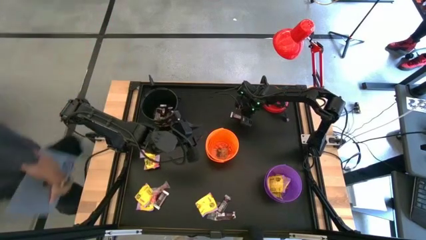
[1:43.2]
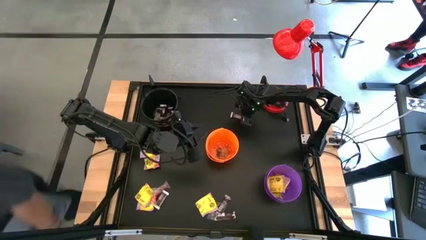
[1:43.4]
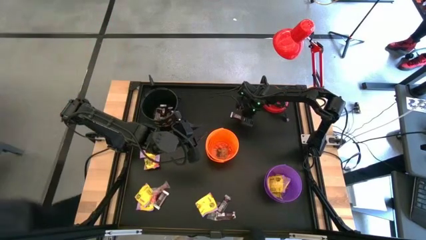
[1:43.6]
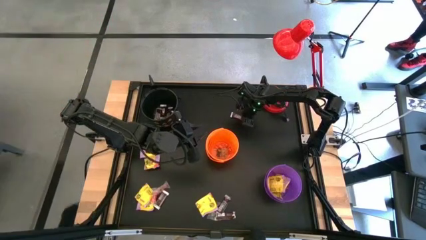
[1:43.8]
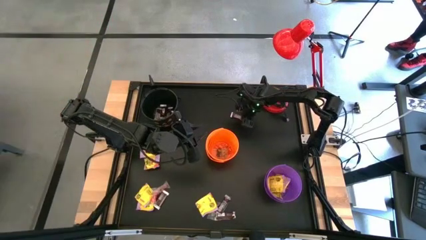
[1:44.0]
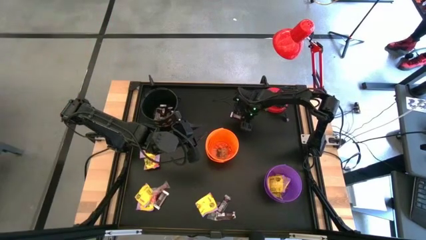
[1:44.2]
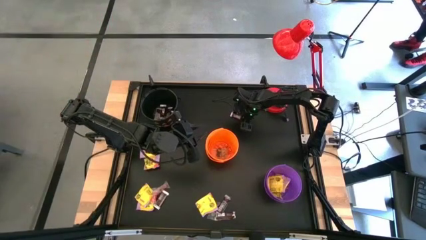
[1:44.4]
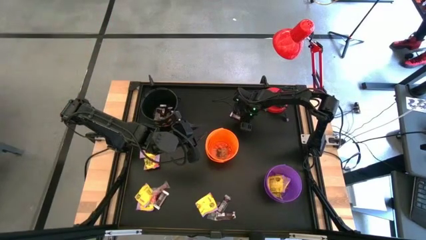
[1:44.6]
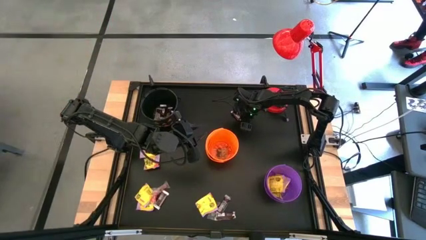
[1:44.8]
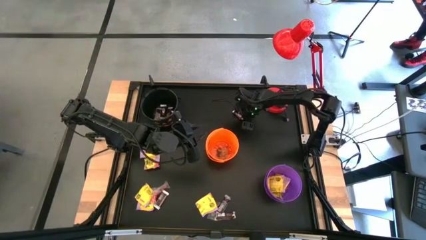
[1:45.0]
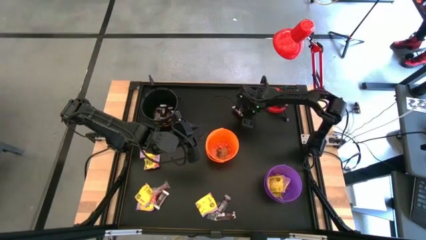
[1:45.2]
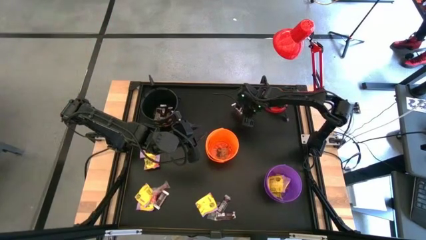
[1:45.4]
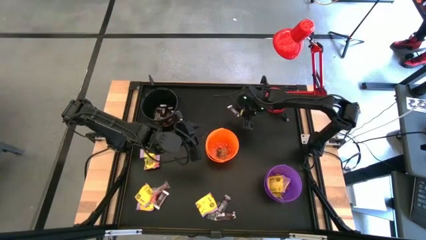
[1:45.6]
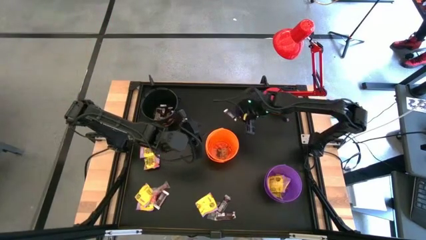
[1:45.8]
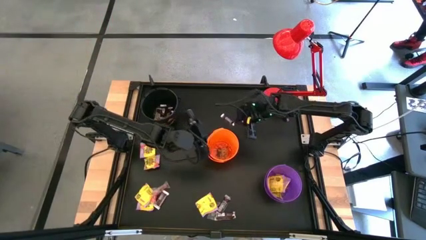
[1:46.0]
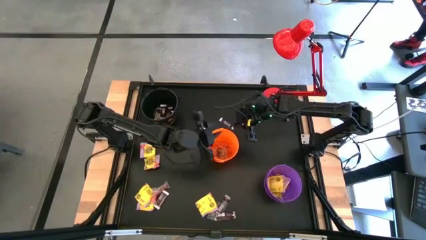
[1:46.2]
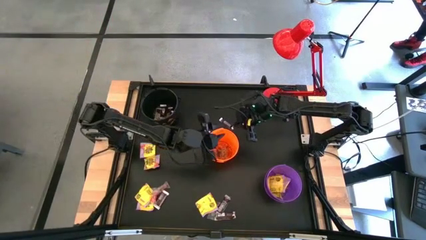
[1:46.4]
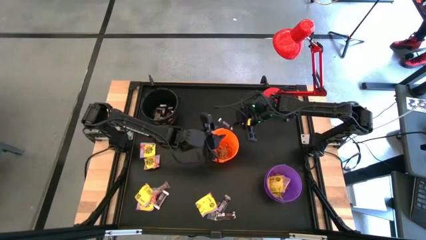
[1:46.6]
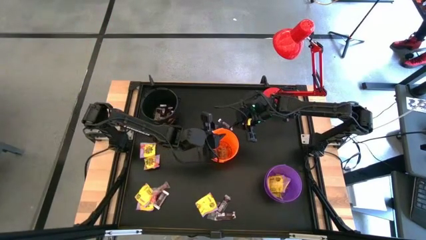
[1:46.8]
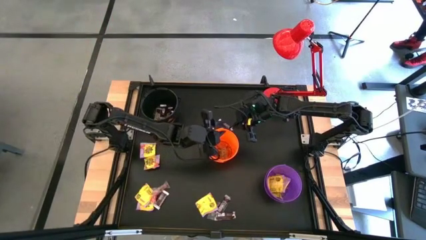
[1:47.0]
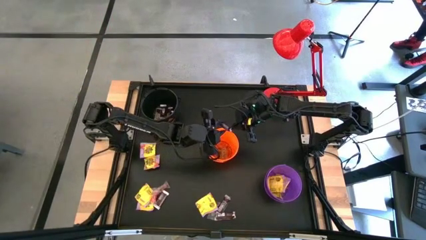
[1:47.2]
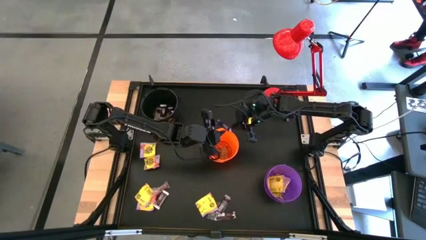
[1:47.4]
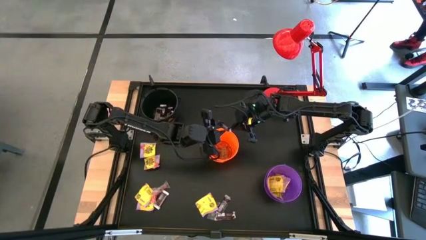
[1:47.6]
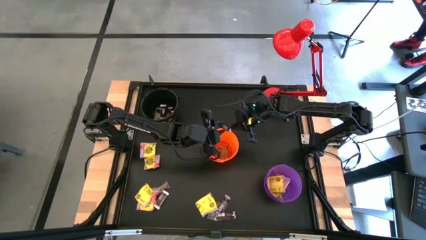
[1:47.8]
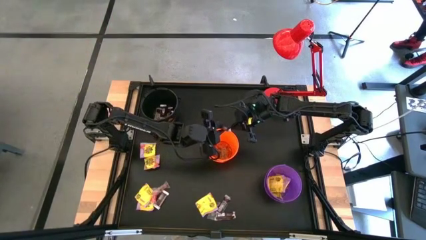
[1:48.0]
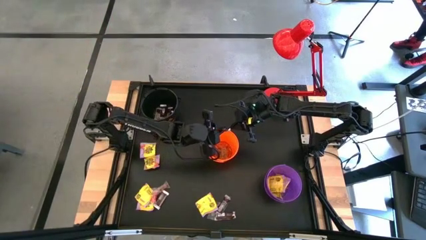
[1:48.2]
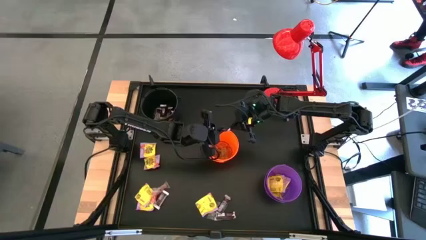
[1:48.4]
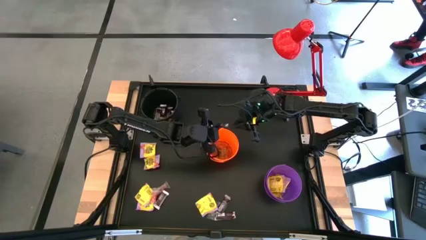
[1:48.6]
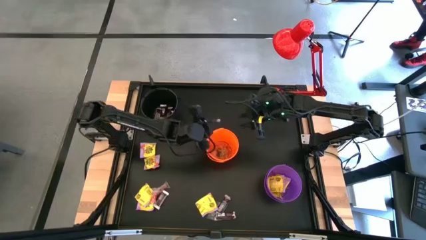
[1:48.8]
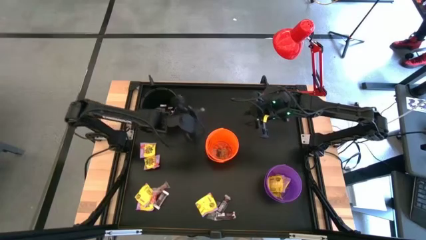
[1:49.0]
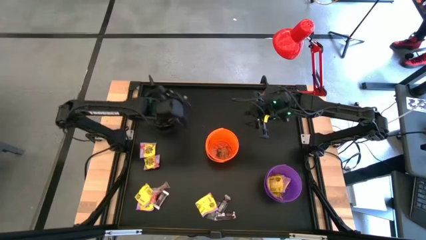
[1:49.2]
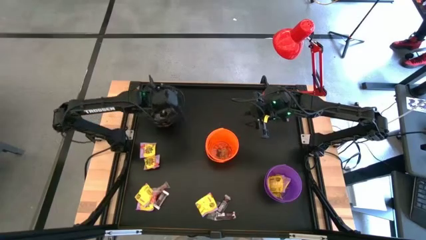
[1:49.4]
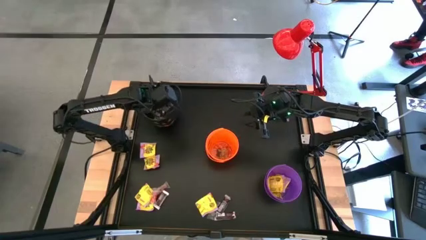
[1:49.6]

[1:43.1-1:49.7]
Task: Sort candy
Put the brown chocolate bar into the black bucket

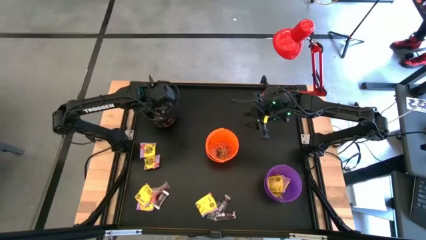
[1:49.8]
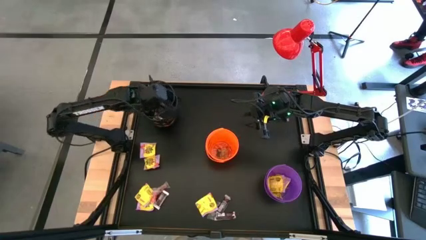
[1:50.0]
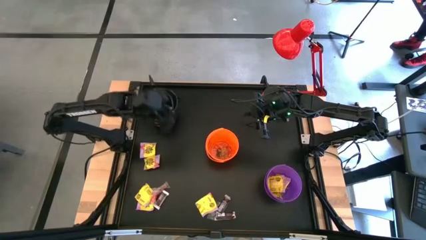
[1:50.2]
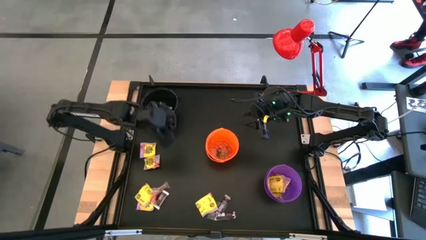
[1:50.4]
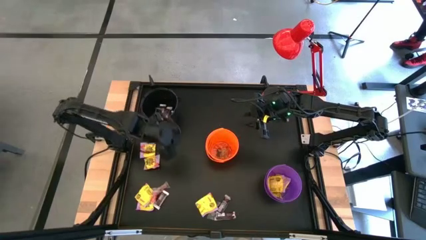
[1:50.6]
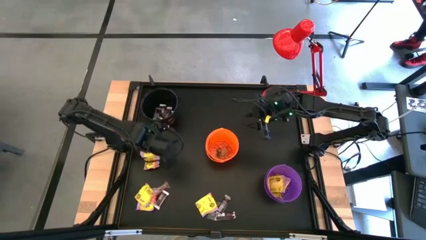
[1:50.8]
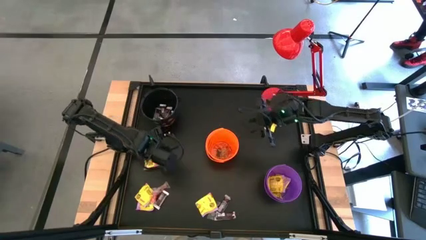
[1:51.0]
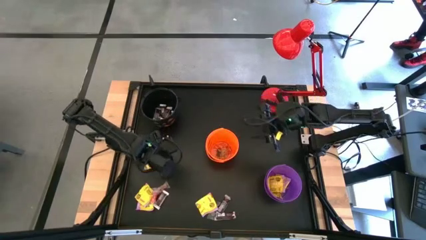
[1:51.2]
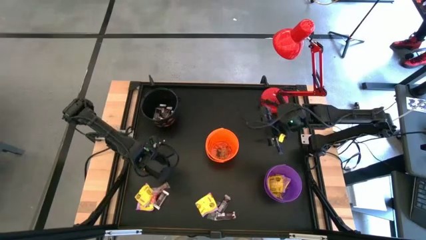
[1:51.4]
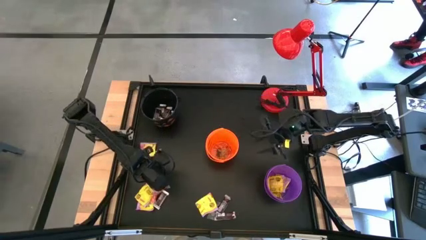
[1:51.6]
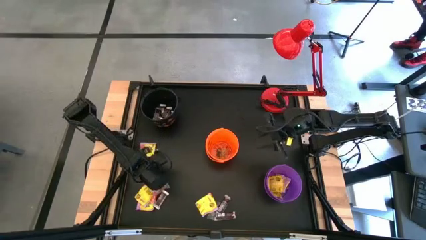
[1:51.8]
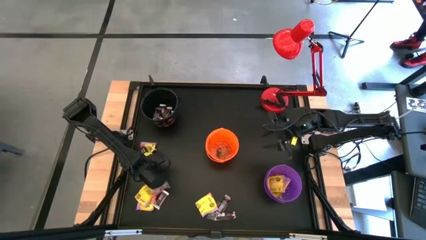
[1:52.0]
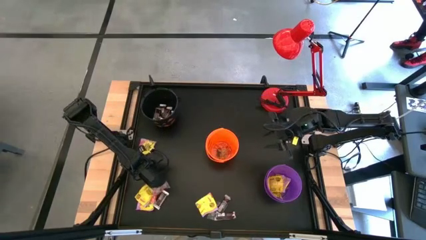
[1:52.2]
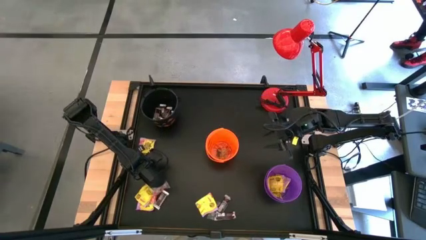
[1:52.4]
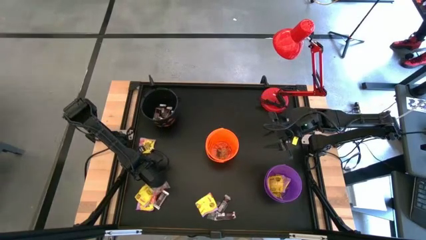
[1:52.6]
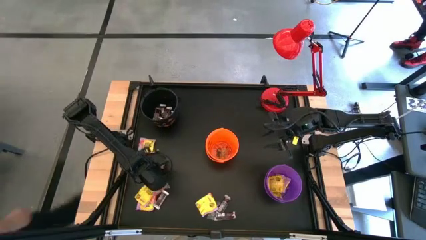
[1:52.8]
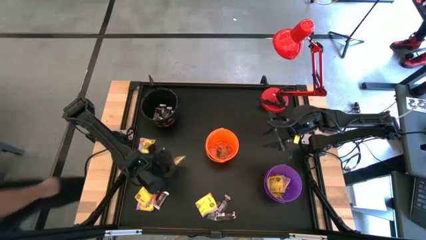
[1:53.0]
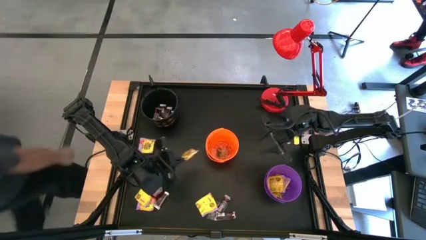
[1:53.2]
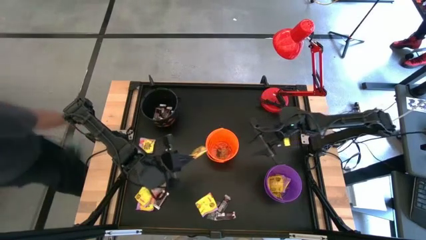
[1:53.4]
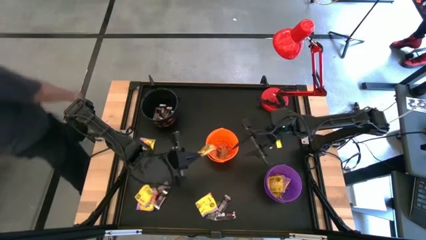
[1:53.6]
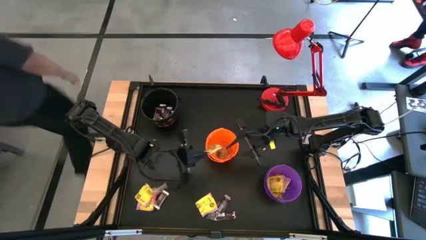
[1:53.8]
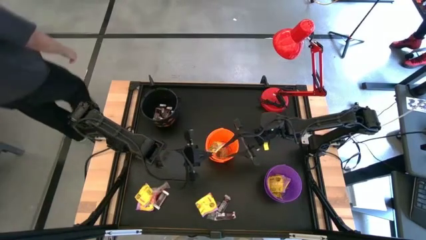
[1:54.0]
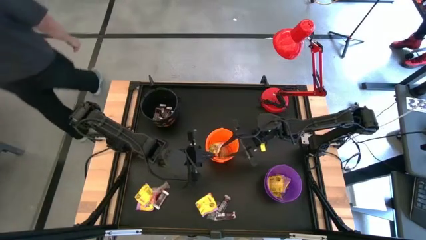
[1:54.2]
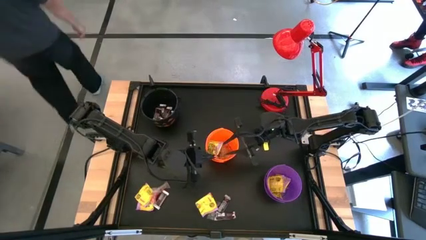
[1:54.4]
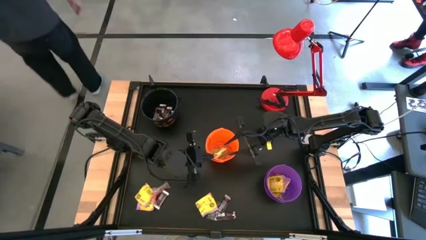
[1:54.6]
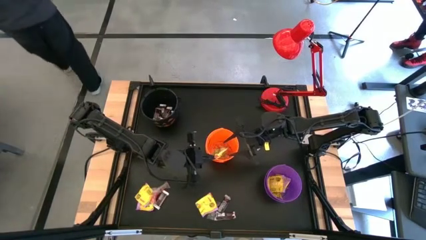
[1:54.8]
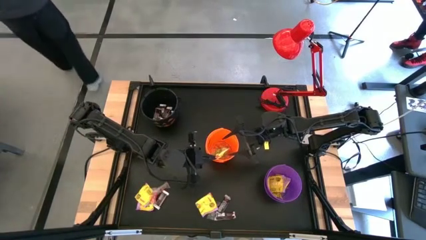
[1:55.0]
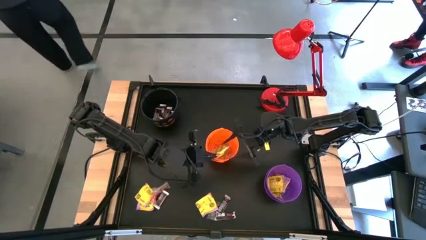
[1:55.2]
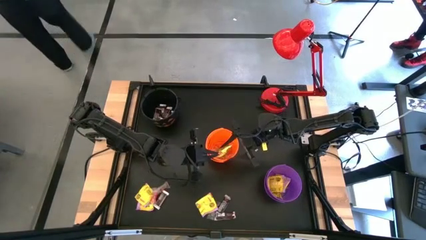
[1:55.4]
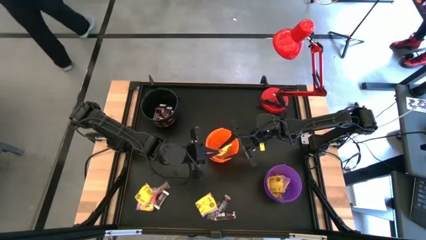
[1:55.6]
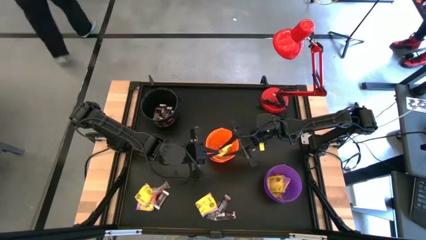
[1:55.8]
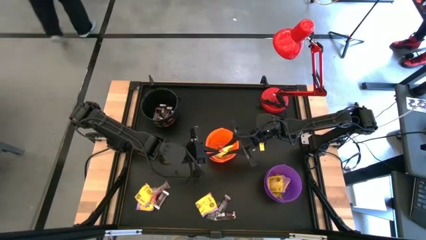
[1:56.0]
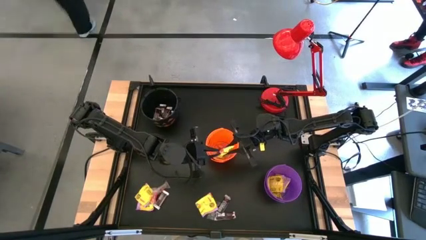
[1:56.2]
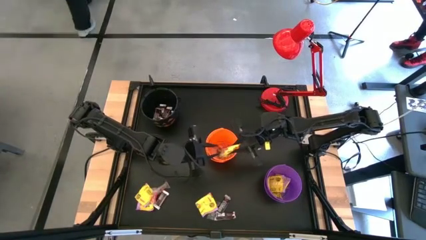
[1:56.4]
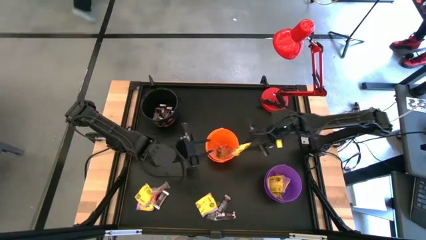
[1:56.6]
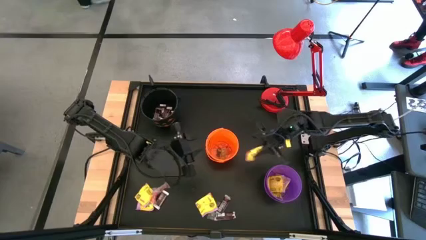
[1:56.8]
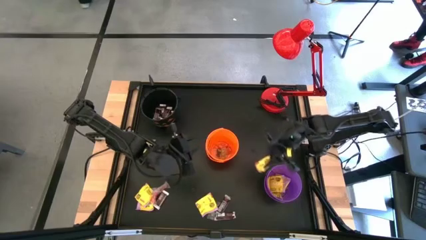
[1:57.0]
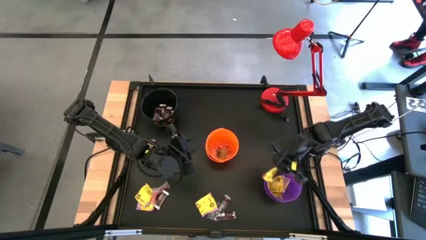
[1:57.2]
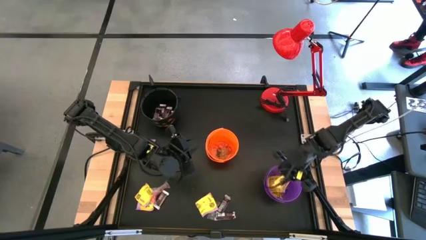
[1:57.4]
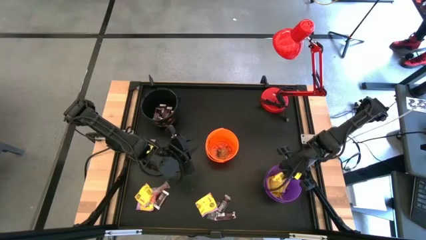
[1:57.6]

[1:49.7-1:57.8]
Put the yellow candy into the purple bucket

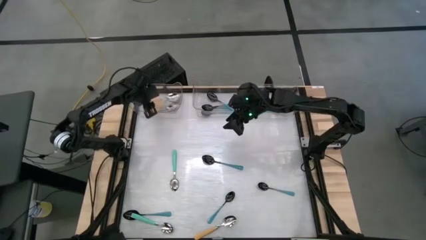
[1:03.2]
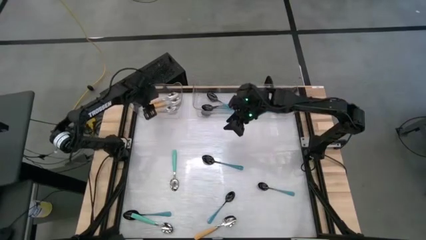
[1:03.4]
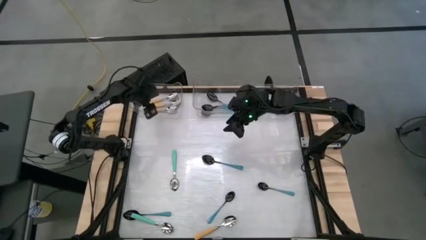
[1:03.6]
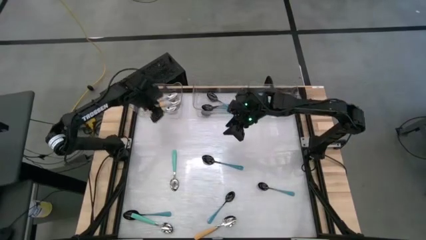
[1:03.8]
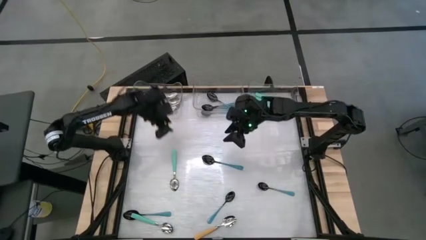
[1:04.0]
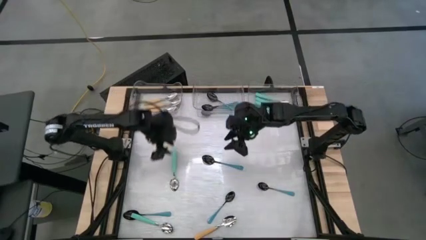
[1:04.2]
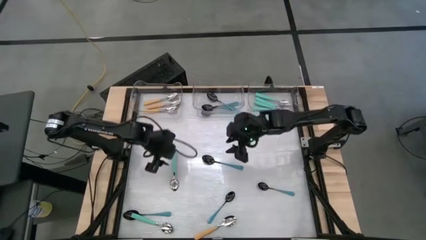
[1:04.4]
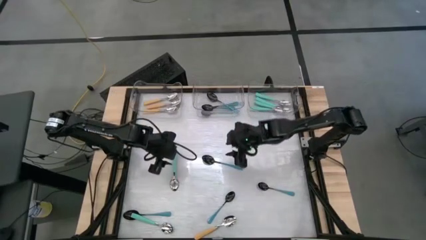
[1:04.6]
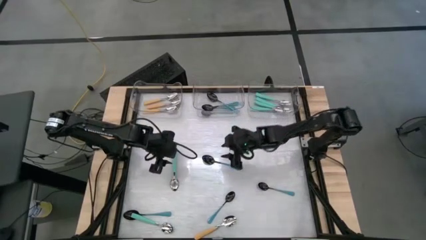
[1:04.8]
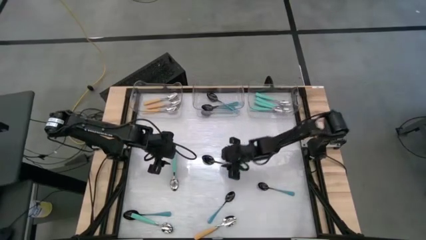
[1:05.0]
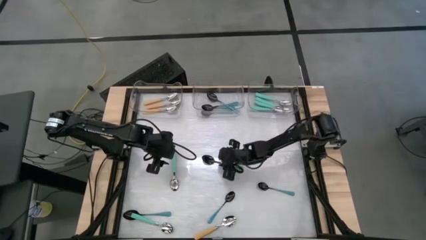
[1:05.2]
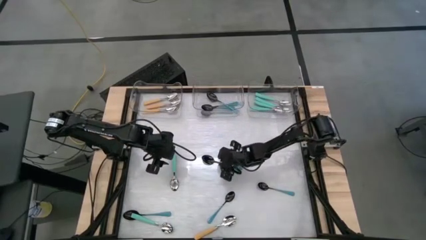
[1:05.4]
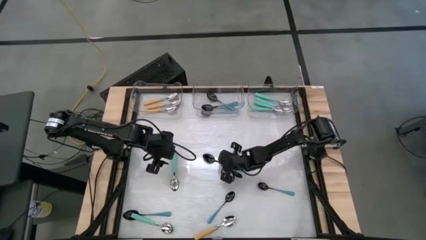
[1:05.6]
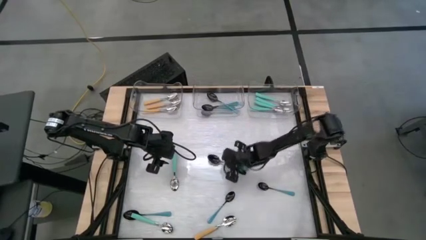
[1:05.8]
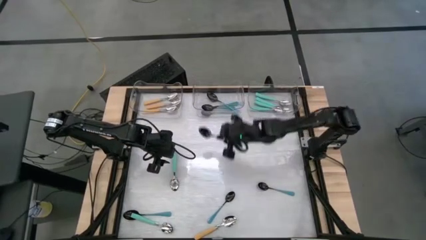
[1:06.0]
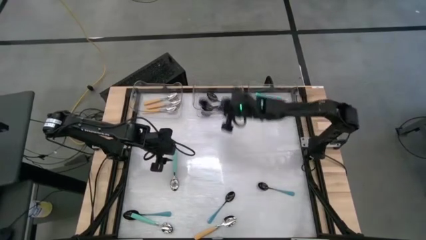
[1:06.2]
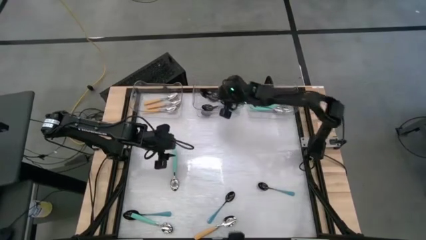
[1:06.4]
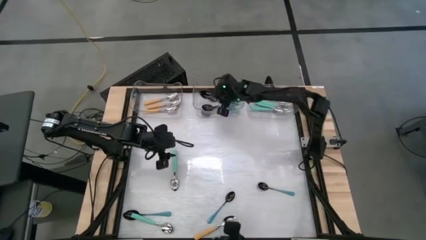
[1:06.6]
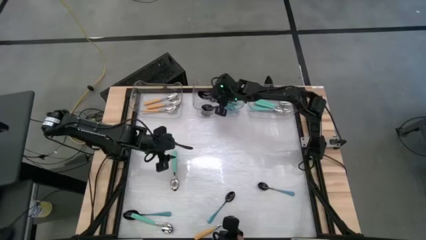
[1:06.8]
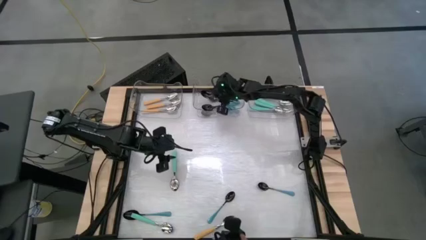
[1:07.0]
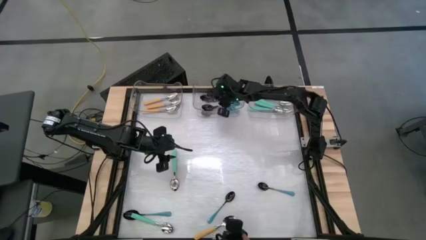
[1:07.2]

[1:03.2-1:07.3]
Task: Sort silverware by color (type)
Put the blue spoon into the middle transparent bin
